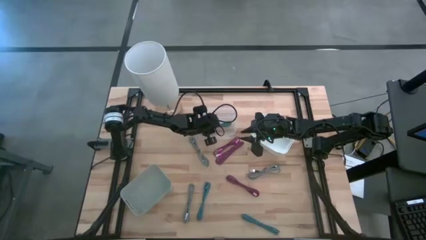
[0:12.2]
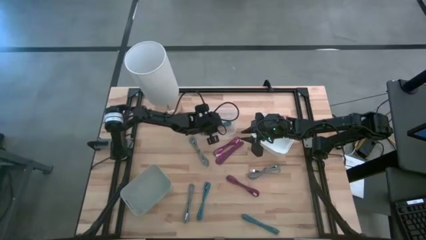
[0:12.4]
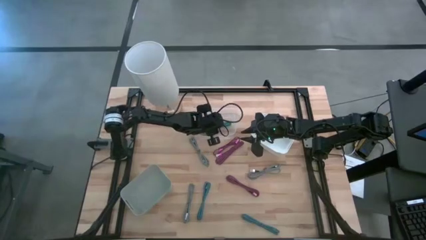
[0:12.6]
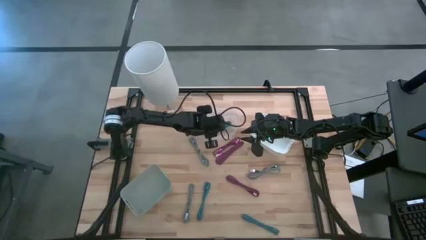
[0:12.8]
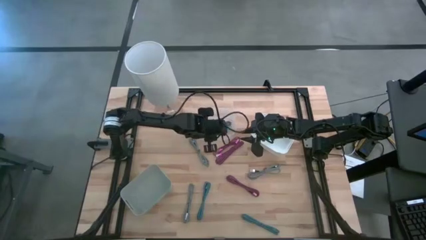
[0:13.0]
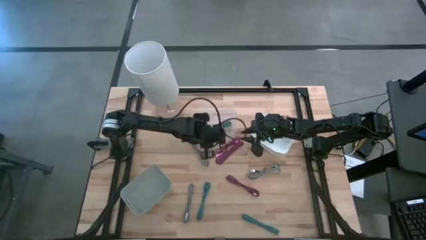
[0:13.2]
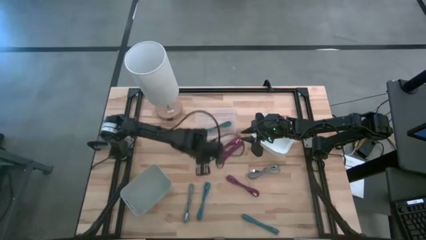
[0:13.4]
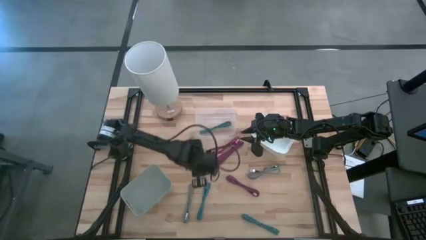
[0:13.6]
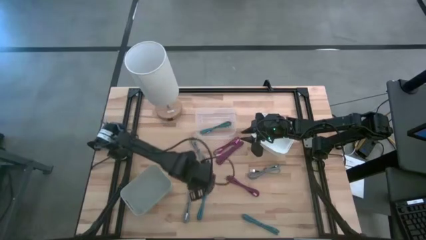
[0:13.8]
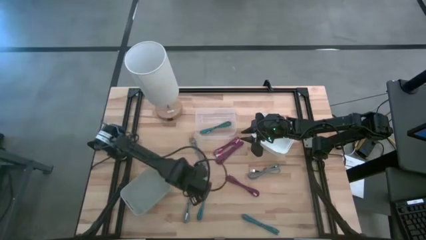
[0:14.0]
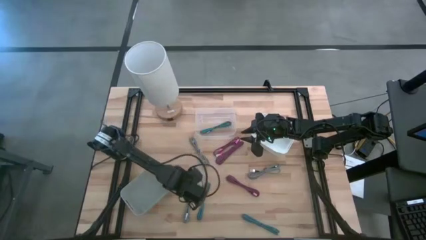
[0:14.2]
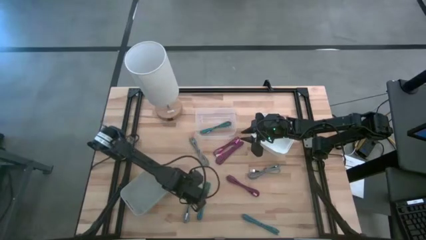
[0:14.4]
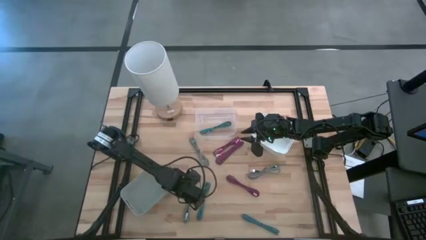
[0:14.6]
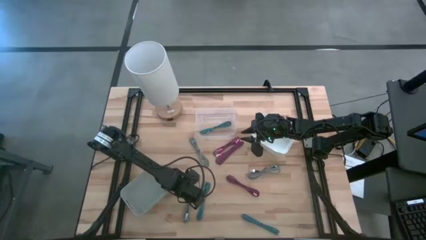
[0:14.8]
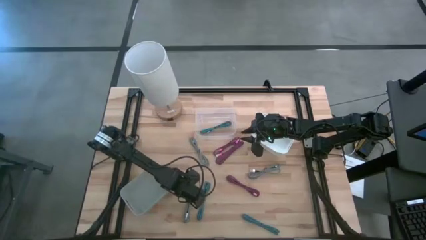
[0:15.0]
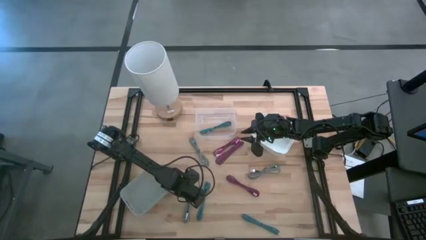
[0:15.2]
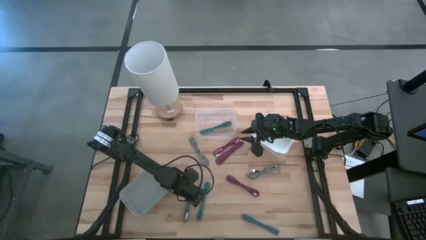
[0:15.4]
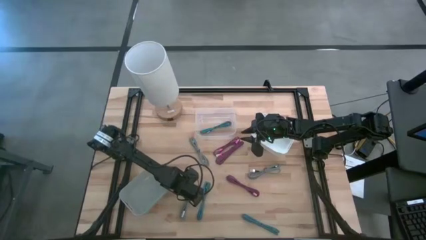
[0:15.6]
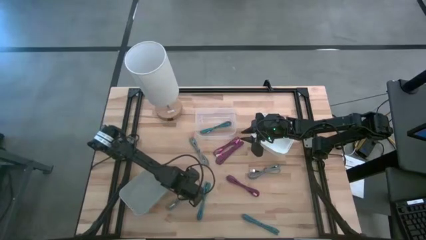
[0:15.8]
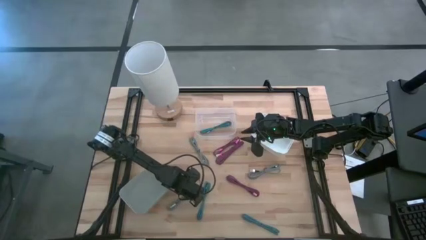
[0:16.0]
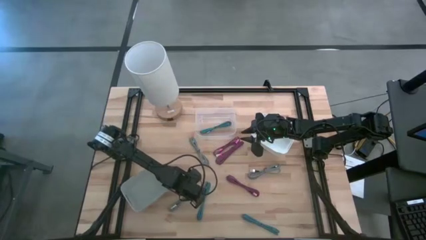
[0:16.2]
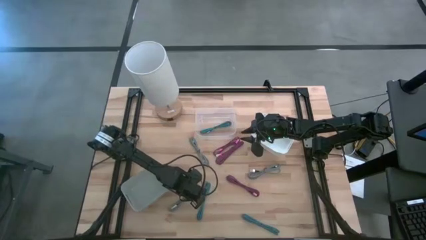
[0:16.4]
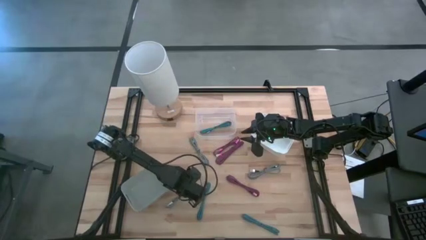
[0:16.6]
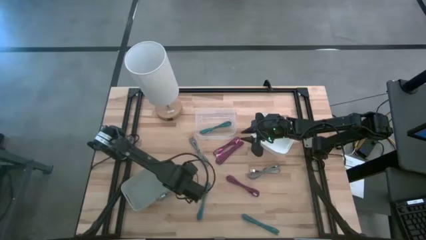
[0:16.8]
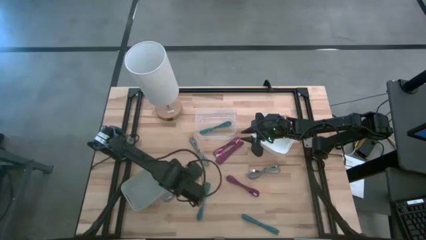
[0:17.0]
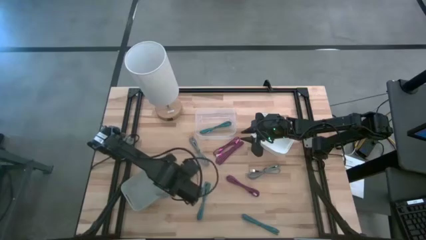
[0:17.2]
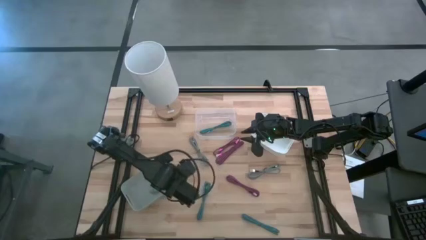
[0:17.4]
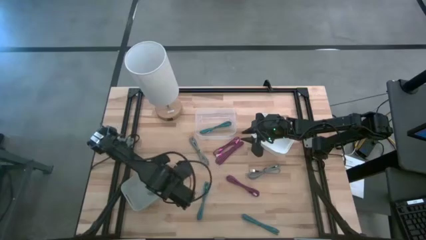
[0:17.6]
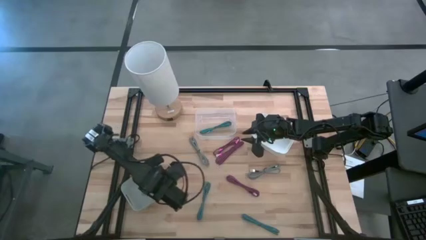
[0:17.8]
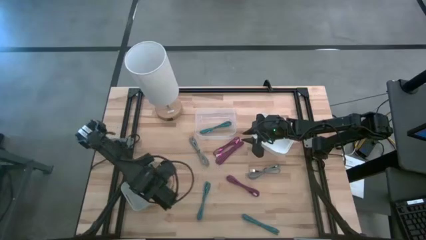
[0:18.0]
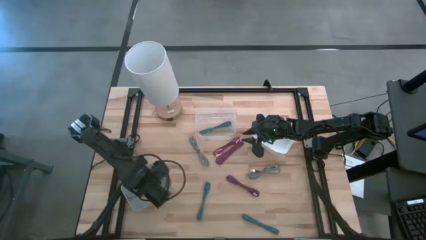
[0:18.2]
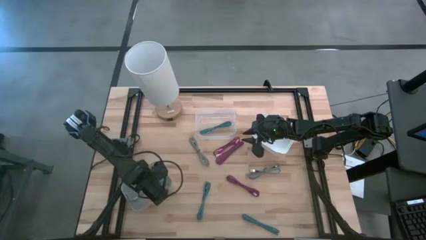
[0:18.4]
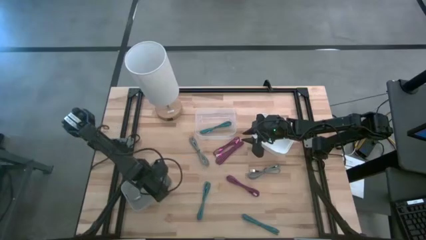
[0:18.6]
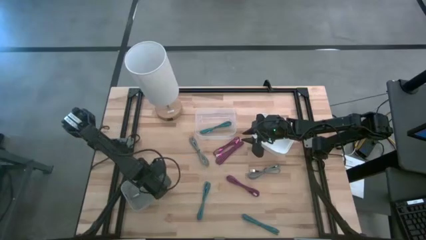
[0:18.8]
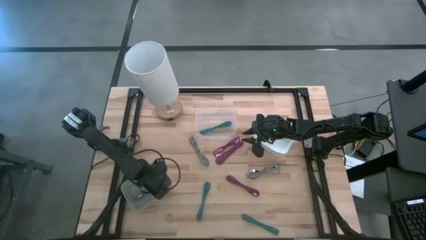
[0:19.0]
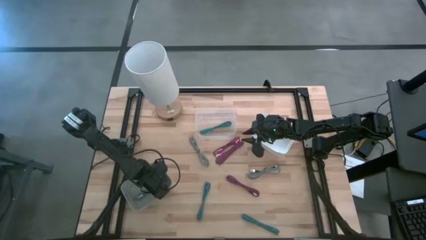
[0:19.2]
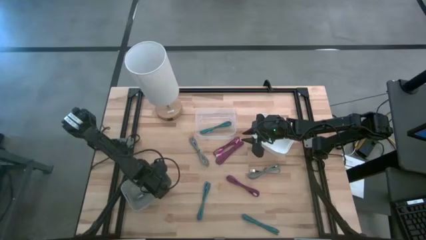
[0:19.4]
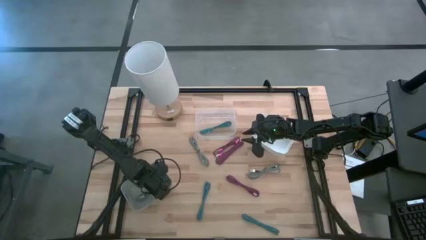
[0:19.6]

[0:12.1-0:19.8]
Task: Pick & Place USB Port
Put the bottom left white USB cable into the gray bin

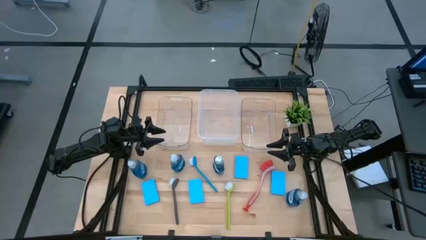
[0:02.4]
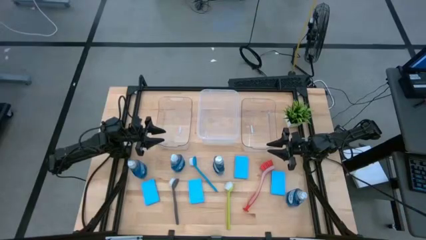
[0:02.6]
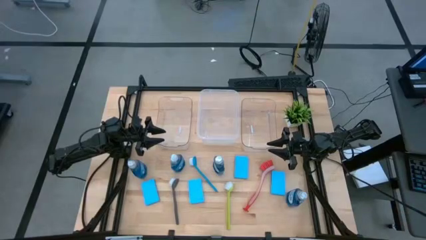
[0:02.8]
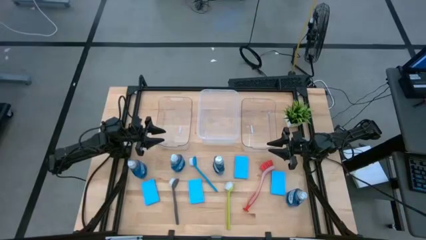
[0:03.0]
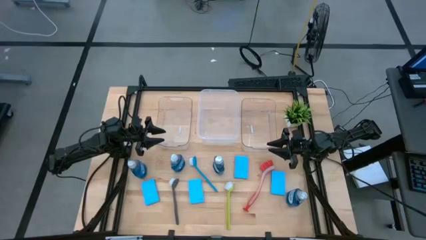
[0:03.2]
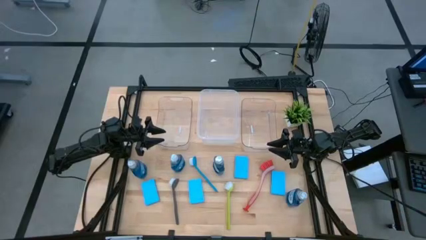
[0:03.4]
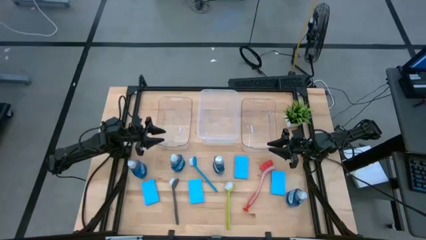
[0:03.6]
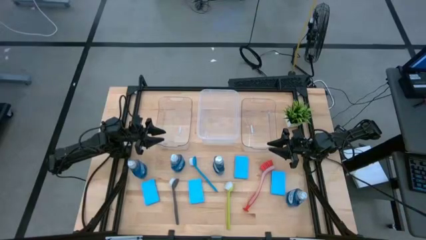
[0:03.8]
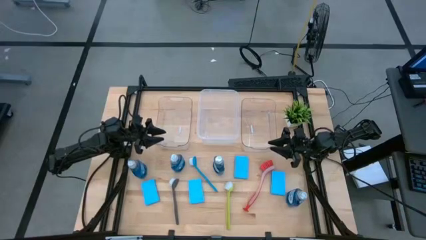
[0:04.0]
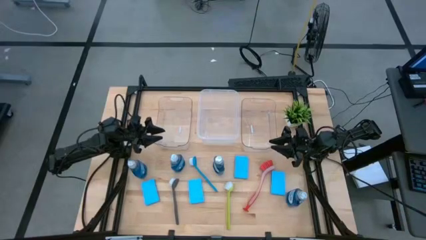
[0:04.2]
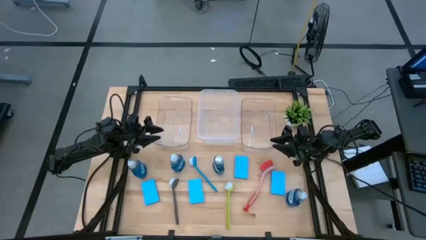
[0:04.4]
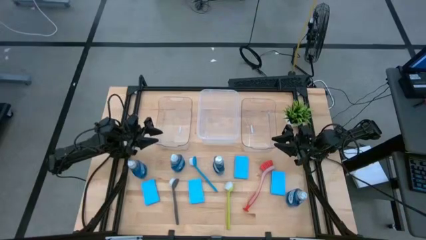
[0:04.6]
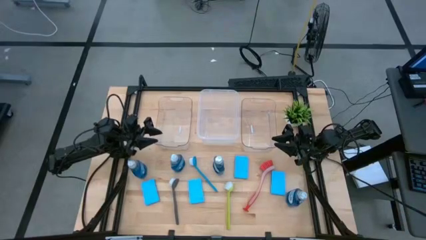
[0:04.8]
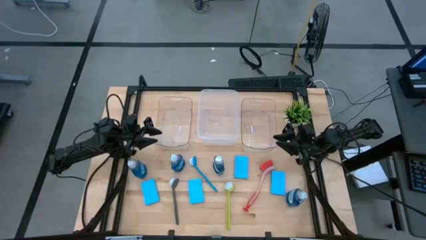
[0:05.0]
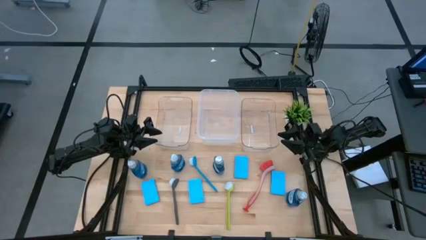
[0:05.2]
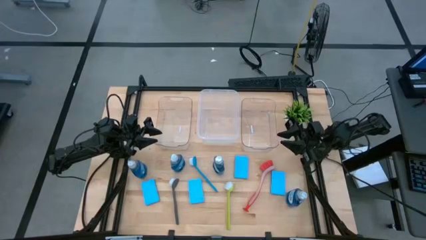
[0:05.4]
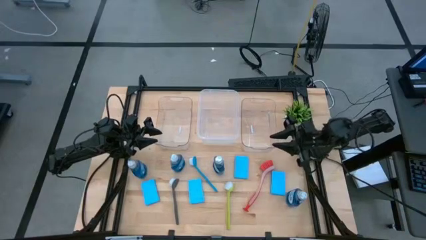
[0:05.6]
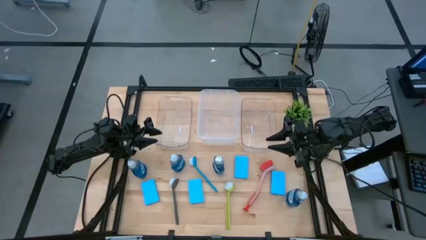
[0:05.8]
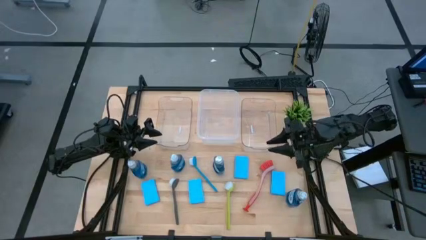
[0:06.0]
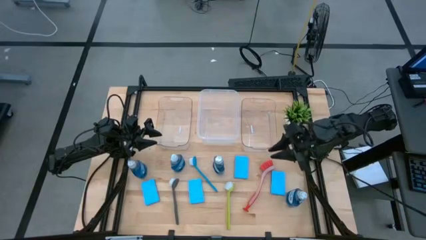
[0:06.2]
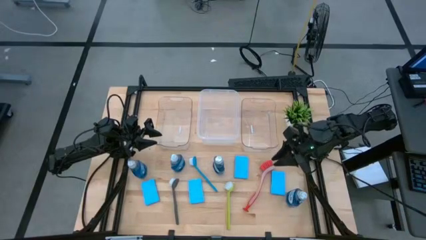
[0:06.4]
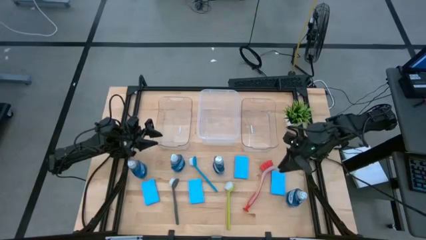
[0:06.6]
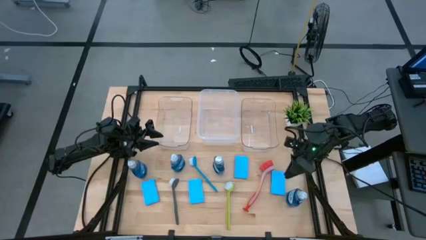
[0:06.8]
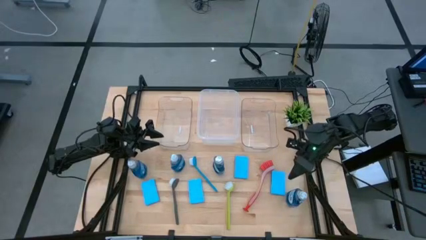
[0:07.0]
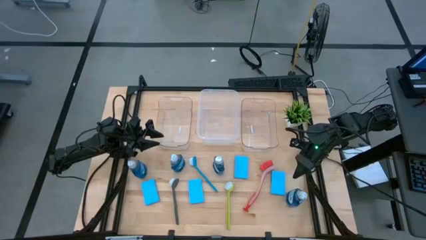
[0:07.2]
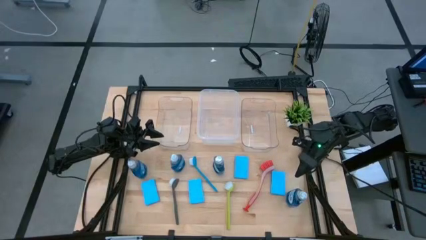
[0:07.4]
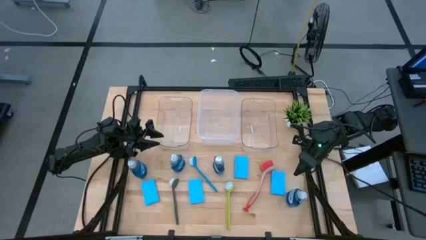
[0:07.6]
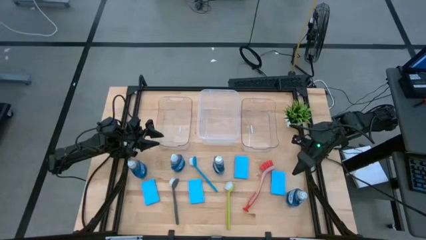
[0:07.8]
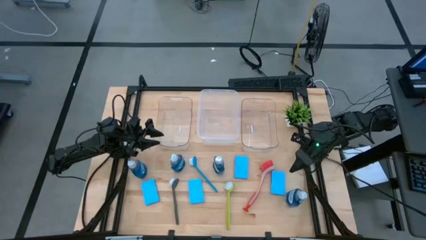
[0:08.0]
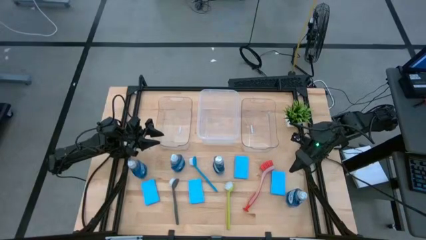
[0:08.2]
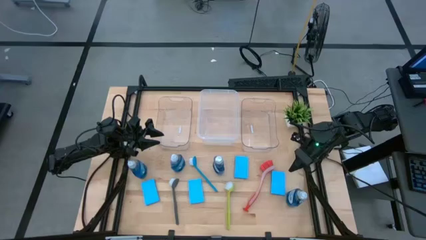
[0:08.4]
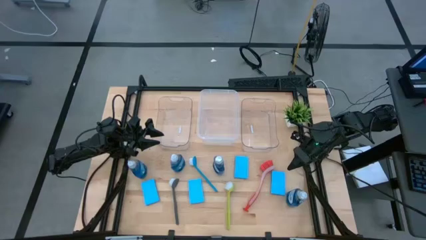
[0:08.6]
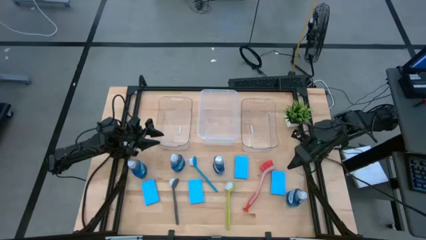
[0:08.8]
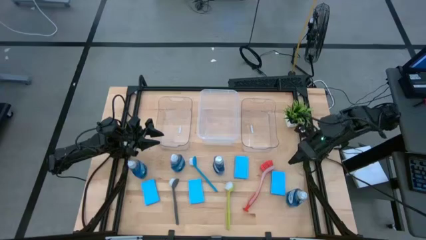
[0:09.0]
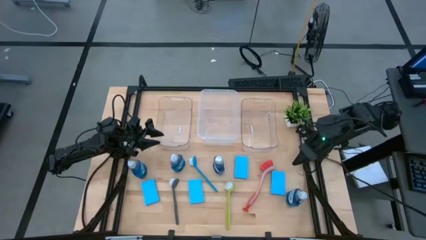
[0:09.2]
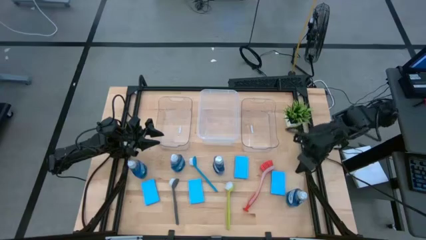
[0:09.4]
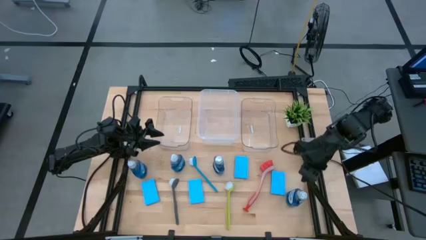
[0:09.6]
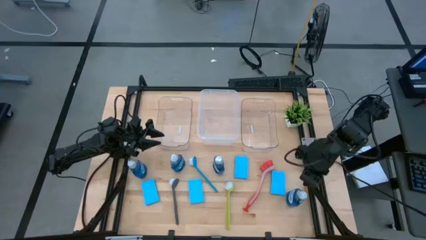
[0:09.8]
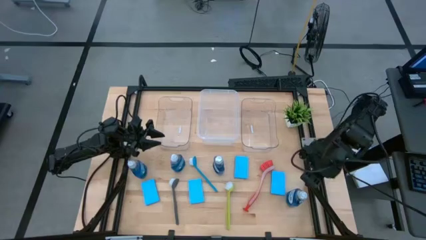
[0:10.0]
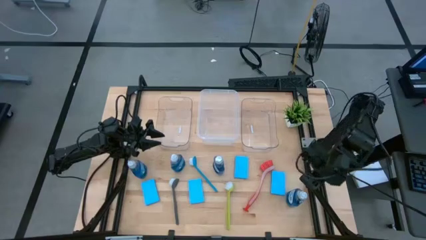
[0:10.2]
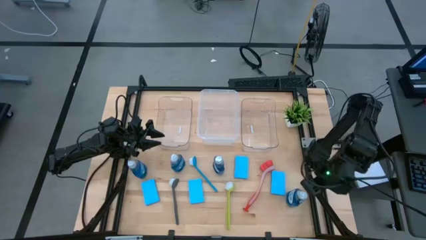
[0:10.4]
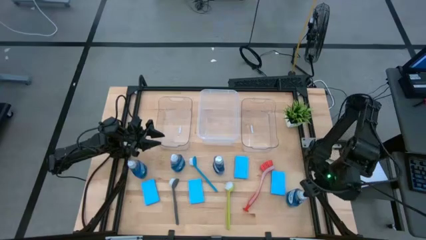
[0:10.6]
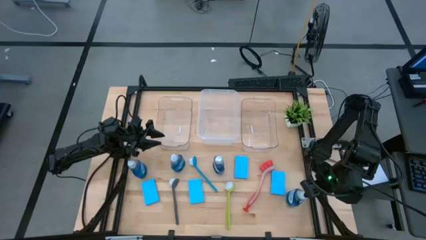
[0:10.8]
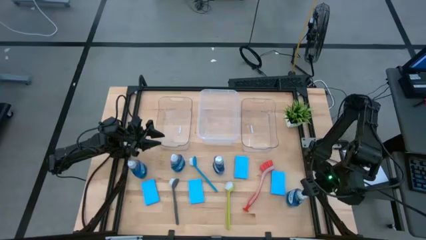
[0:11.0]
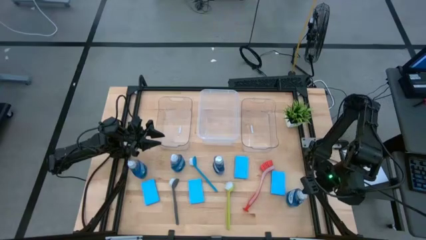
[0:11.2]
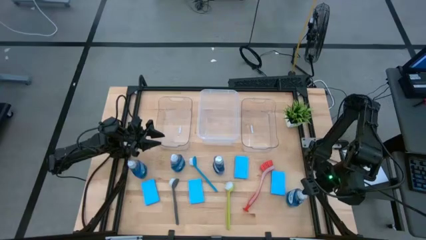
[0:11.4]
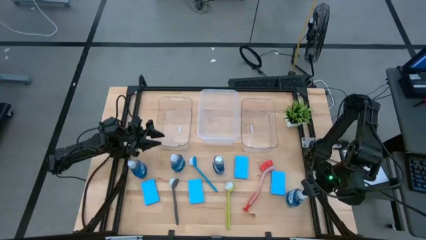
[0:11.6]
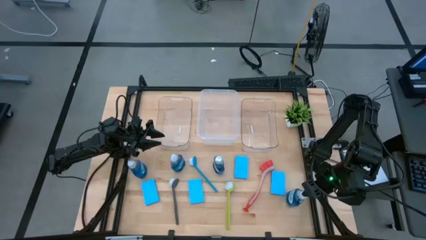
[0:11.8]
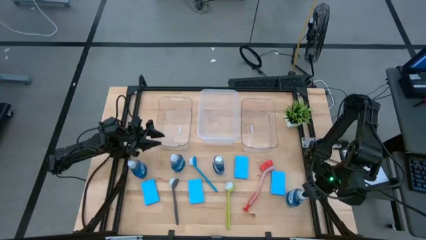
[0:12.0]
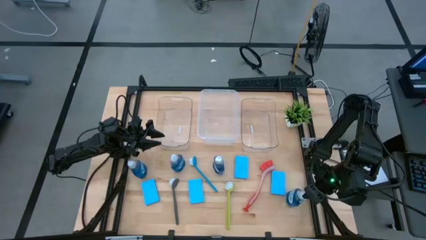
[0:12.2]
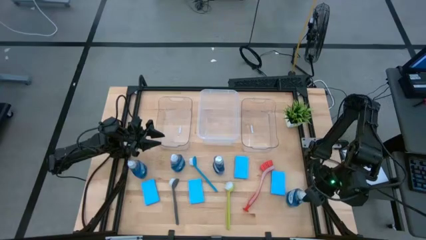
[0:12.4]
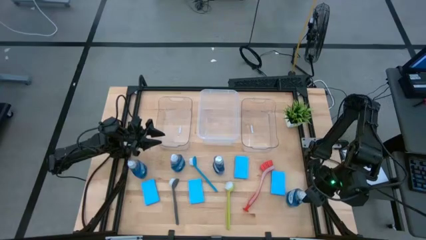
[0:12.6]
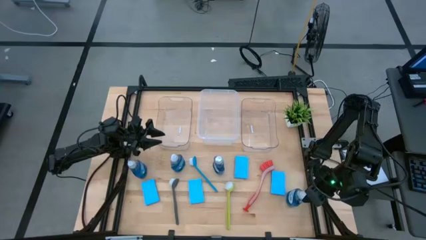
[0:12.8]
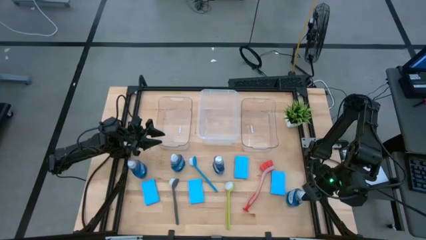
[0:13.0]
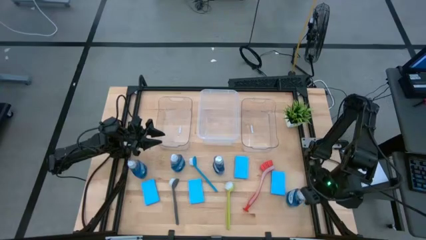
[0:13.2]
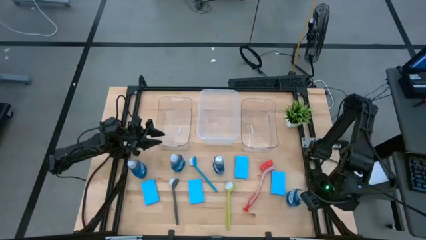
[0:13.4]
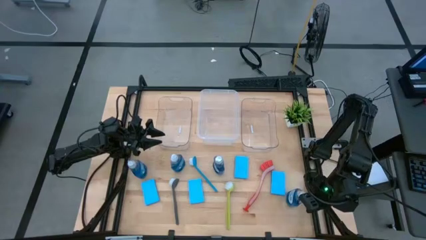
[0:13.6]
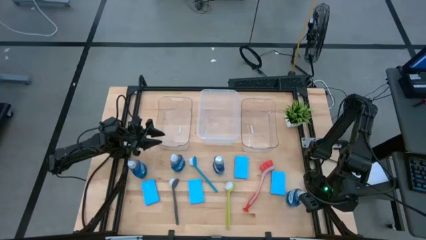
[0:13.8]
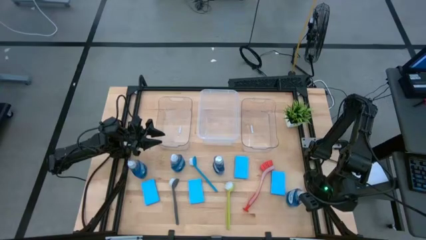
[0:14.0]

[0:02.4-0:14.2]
Task: Pick & Place Kitchen Sink Supplies
Put the blue dishwashing liquid into the right transparent bin
